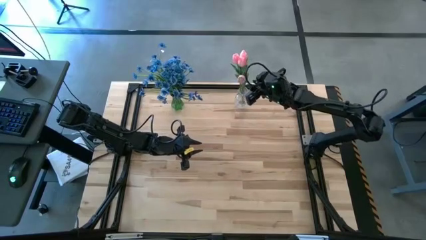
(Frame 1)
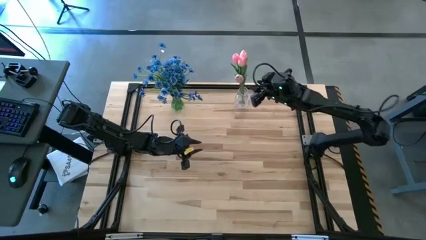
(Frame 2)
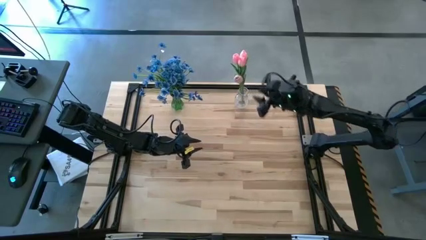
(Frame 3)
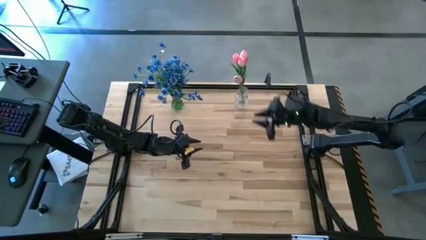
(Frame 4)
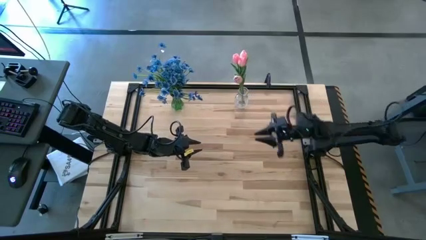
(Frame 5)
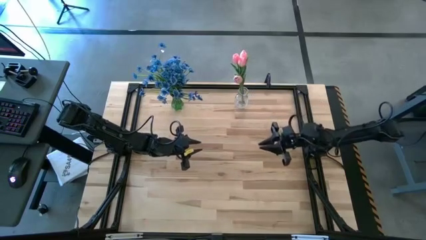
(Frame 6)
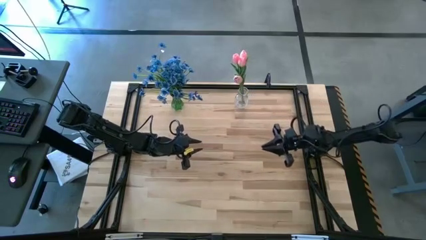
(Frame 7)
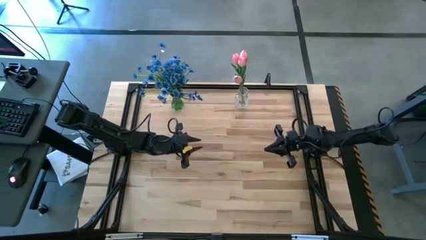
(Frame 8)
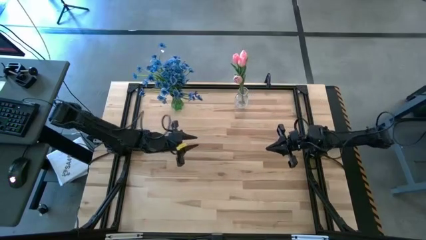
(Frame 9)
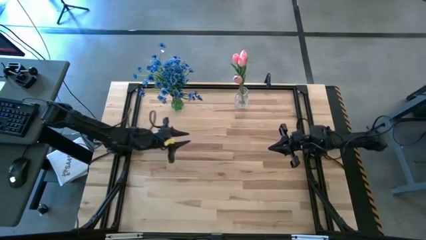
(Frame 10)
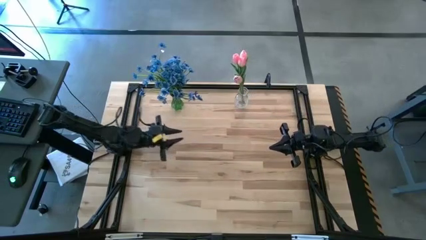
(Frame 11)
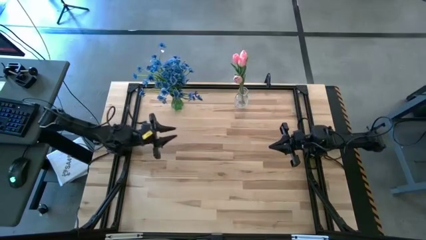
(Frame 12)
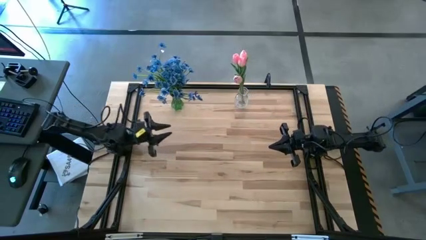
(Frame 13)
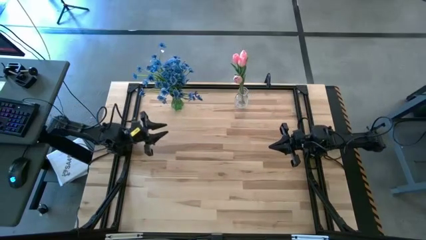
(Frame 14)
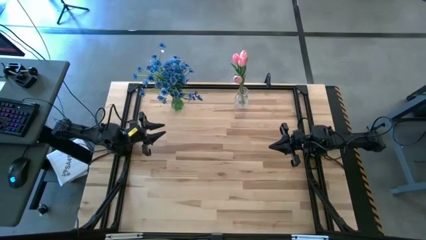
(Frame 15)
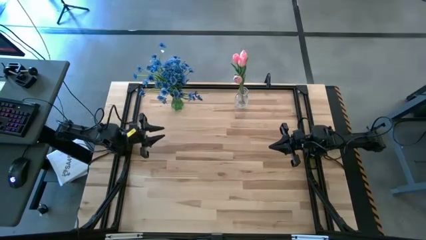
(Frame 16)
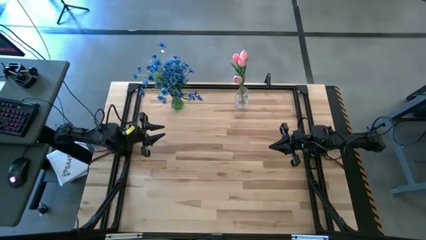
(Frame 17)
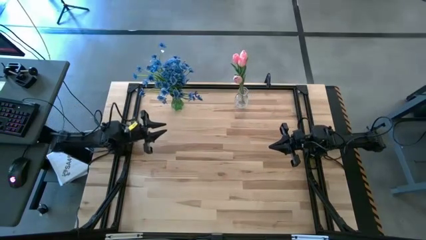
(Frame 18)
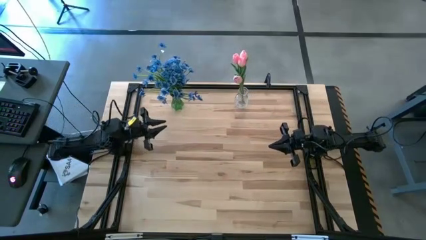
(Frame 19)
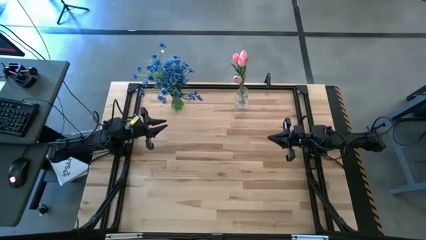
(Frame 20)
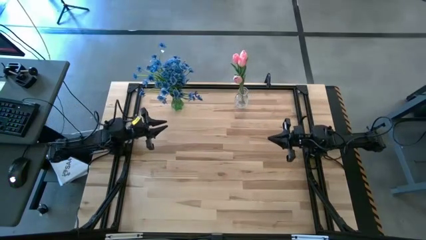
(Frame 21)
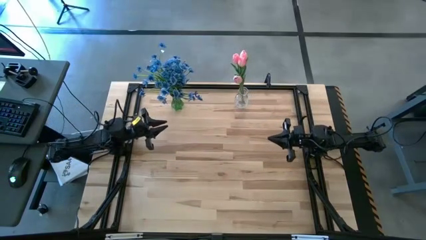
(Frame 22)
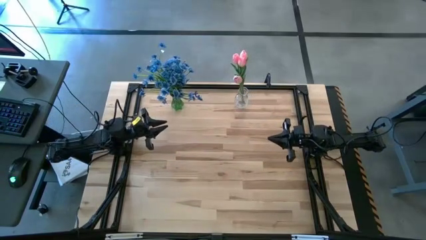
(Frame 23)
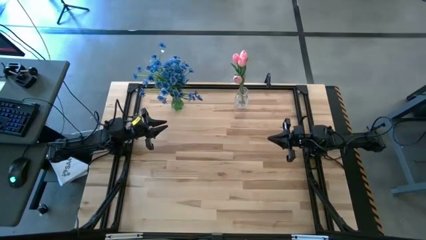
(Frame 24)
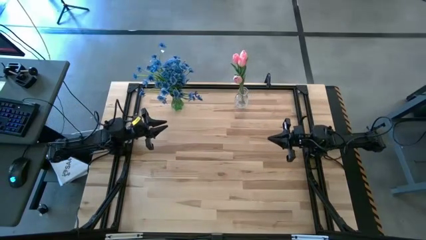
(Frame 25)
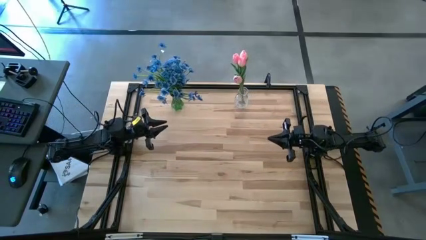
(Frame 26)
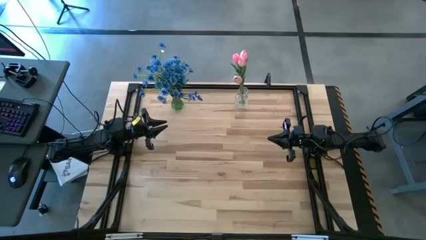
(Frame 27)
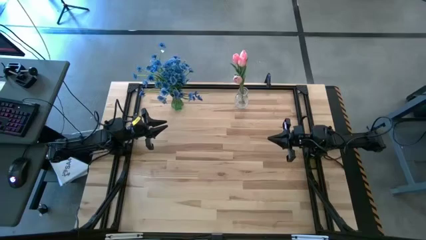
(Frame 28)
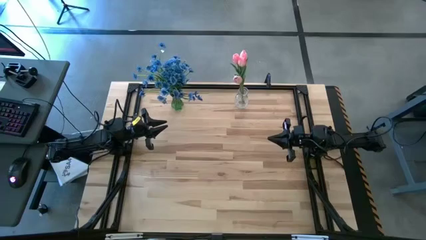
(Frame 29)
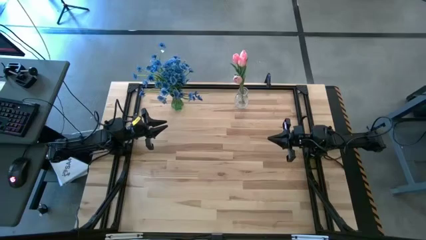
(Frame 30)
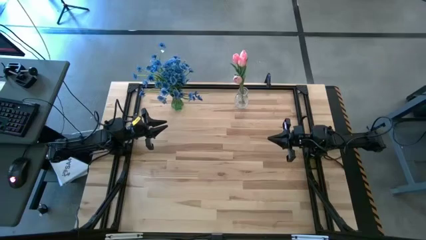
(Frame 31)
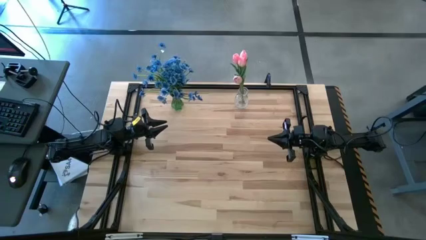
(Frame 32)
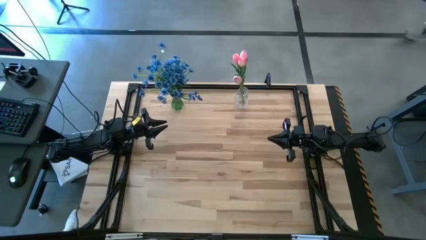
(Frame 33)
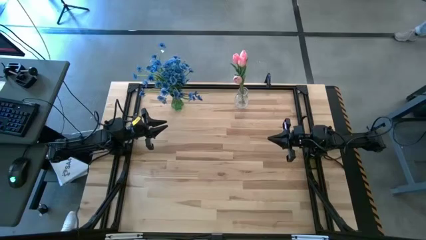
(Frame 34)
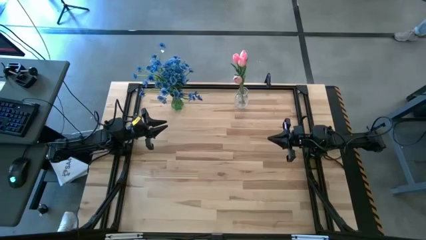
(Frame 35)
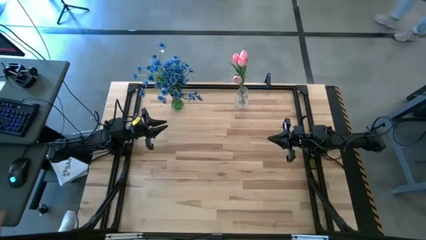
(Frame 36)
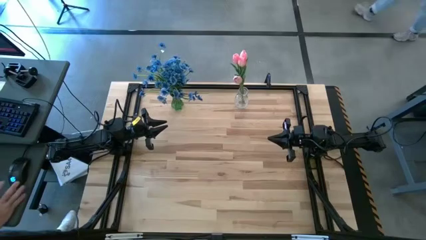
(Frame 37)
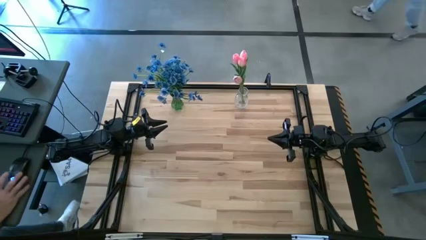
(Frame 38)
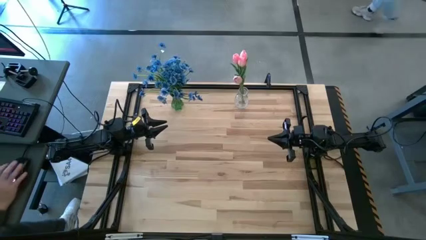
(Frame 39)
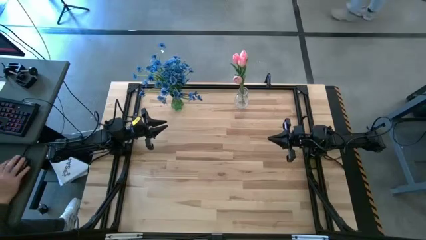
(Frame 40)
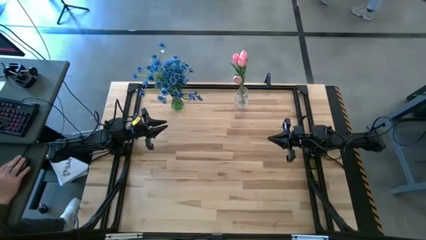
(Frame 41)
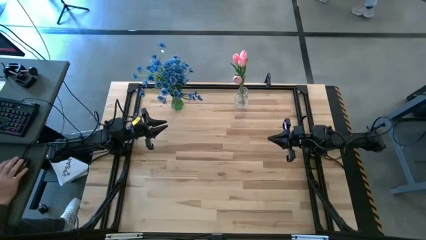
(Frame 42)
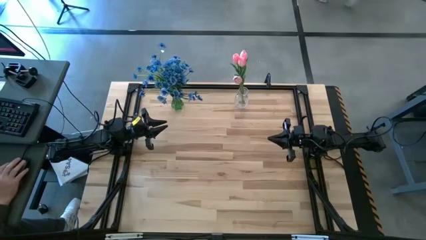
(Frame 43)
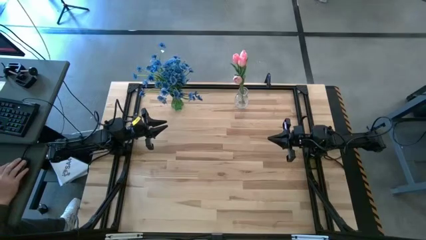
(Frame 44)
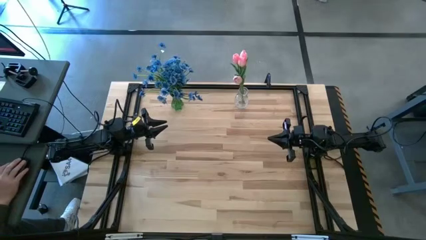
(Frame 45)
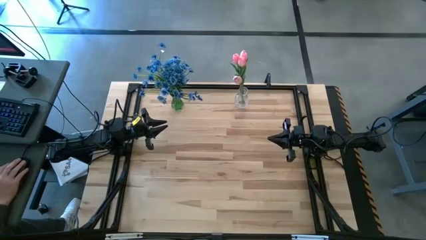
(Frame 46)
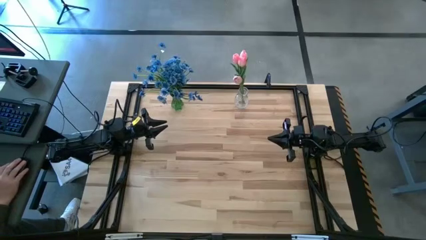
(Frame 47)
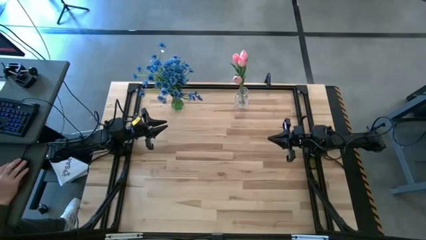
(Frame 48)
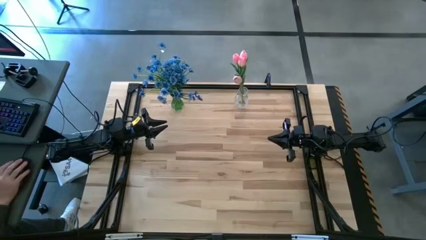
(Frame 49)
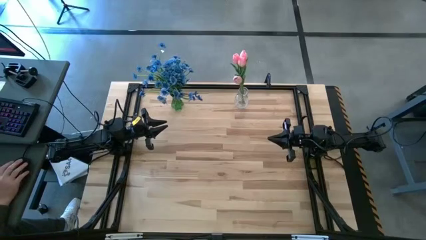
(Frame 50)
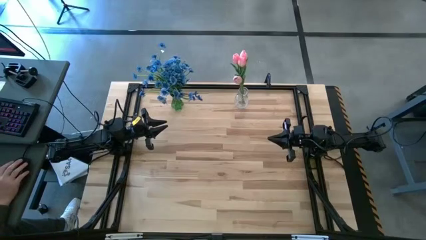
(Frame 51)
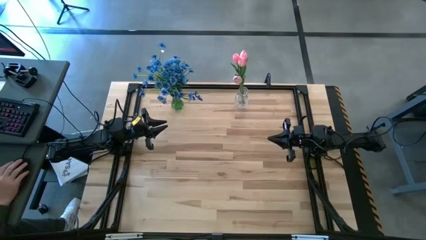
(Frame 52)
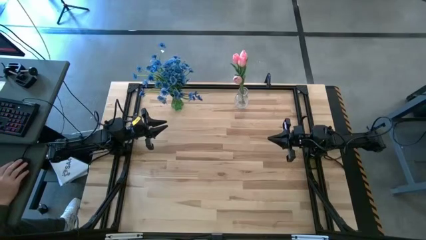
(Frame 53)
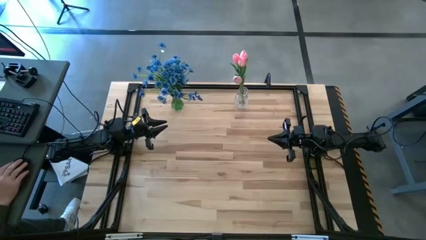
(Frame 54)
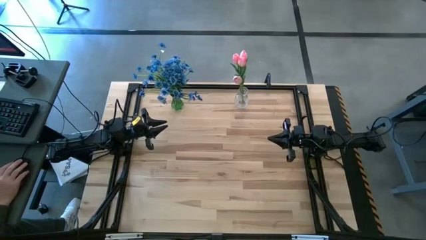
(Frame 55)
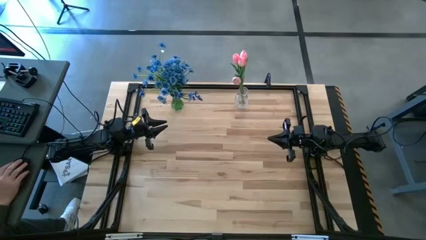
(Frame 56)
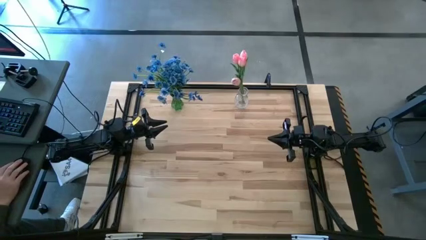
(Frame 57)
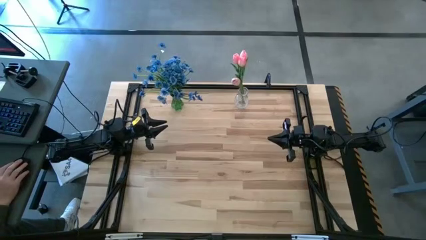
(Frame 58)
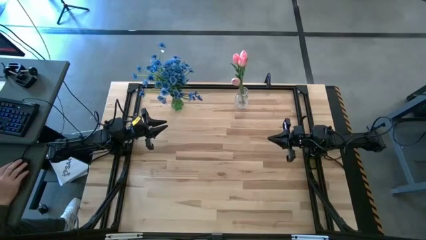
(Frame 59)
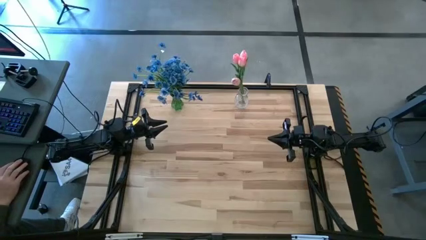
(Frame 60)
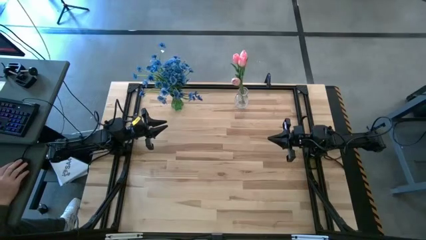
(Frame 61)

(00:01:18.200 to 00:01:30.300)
Task: Sort flowers into vase by color
Return to Home Position
